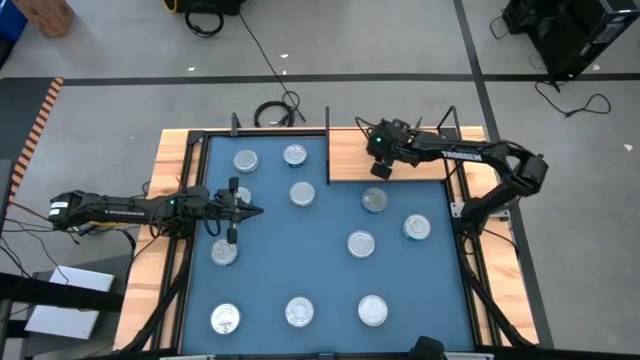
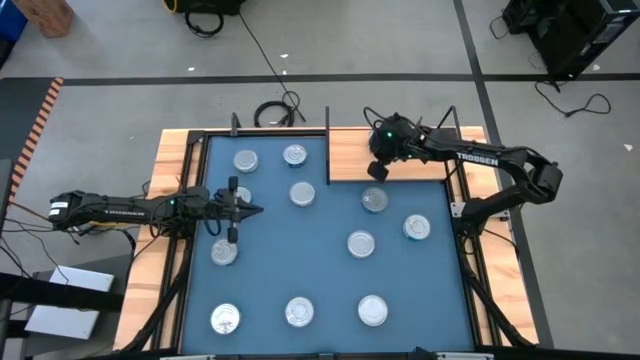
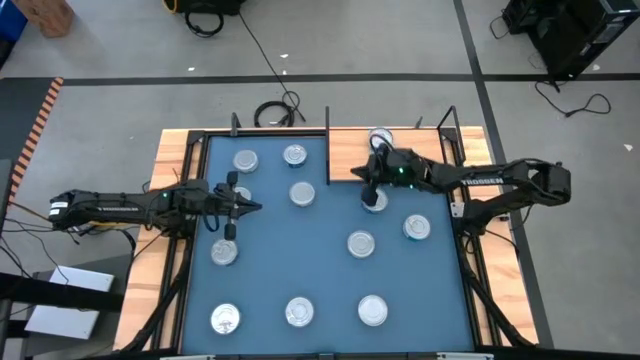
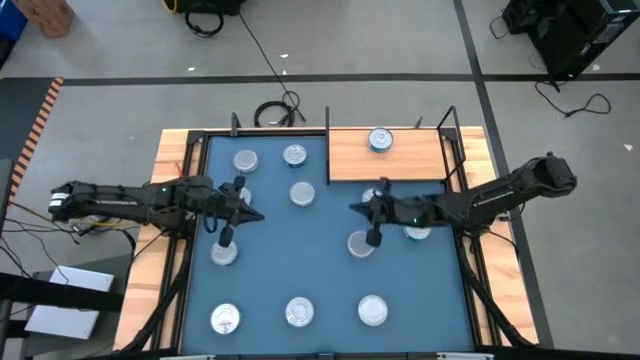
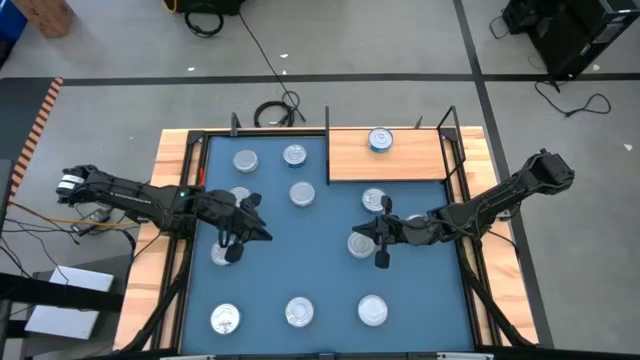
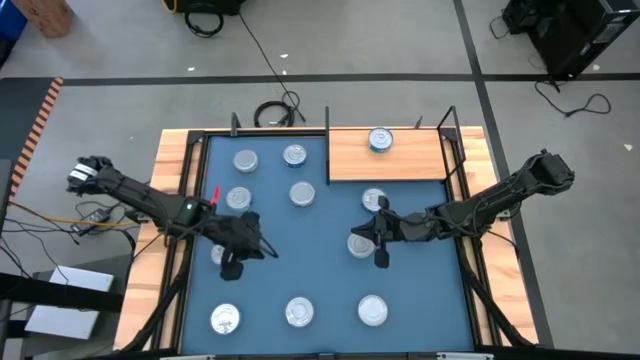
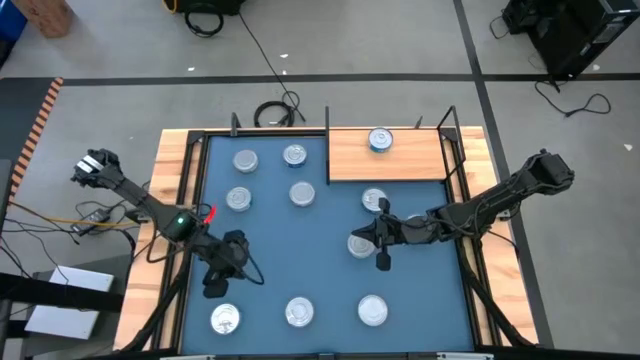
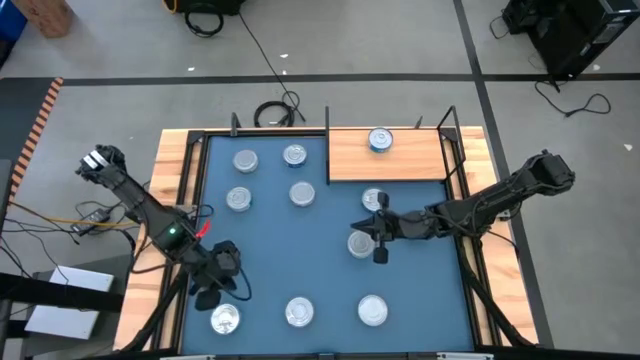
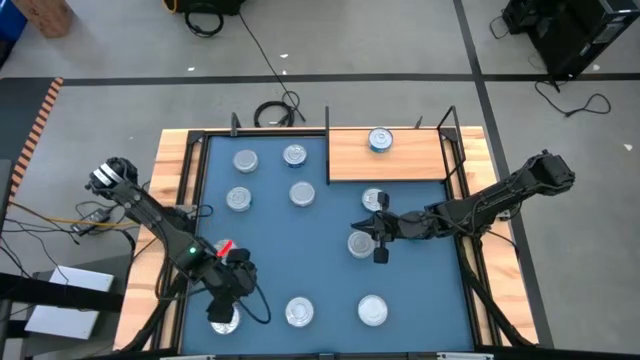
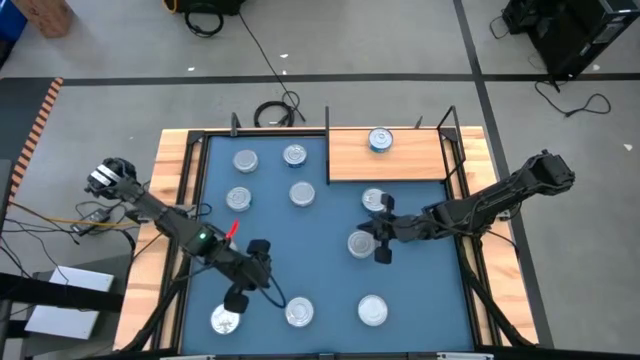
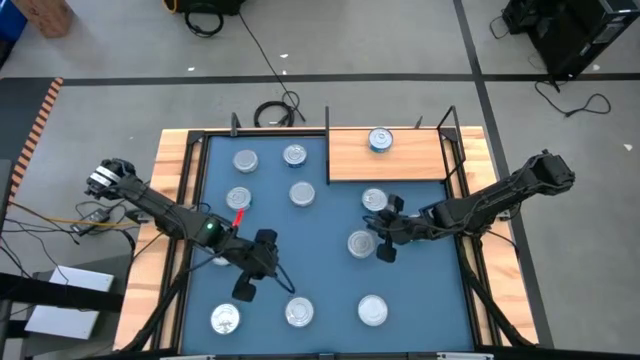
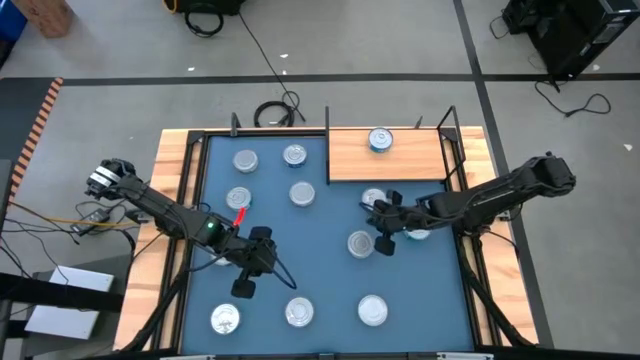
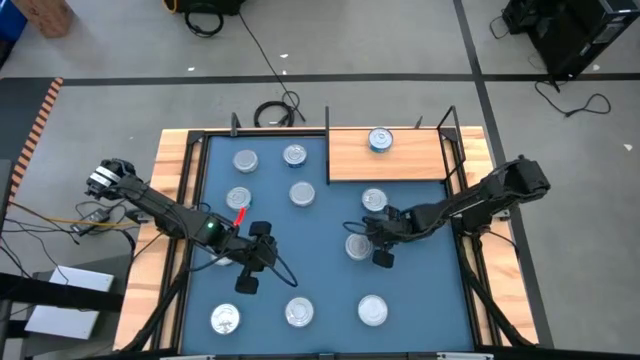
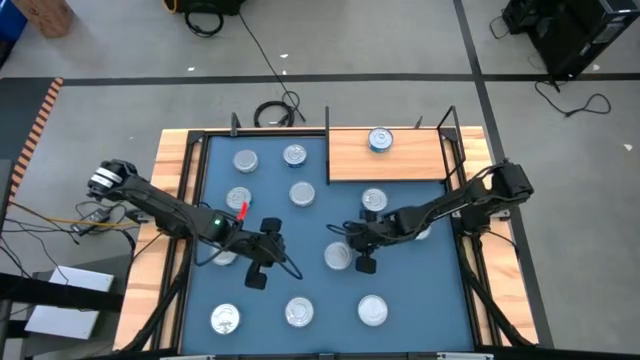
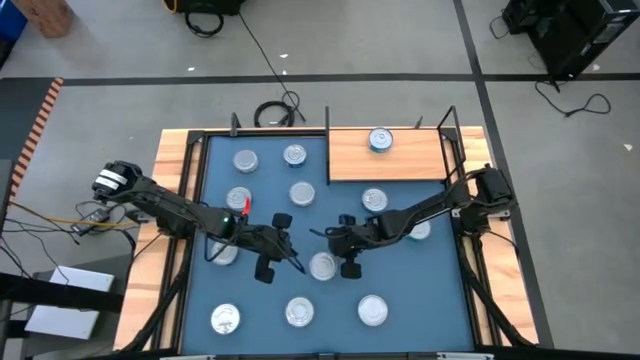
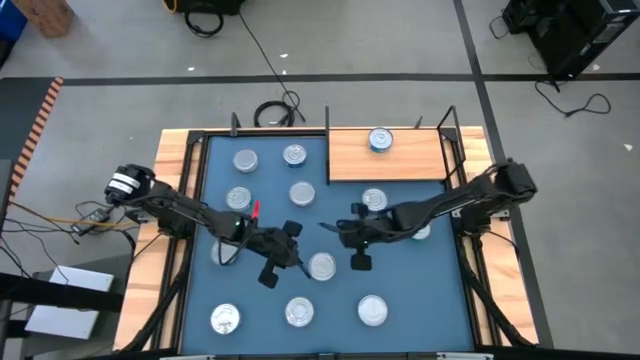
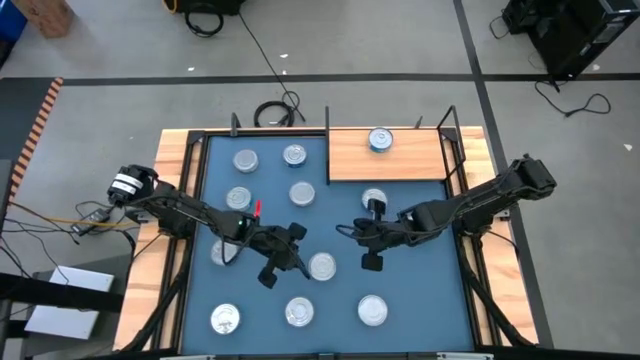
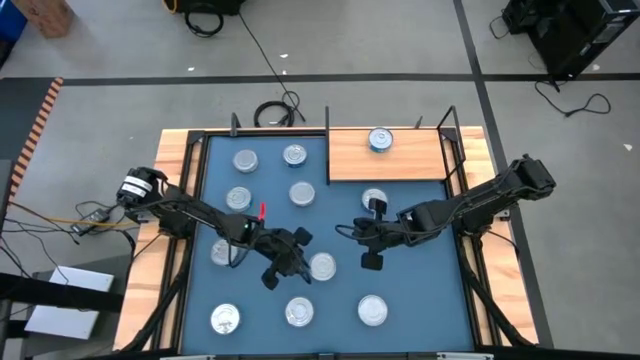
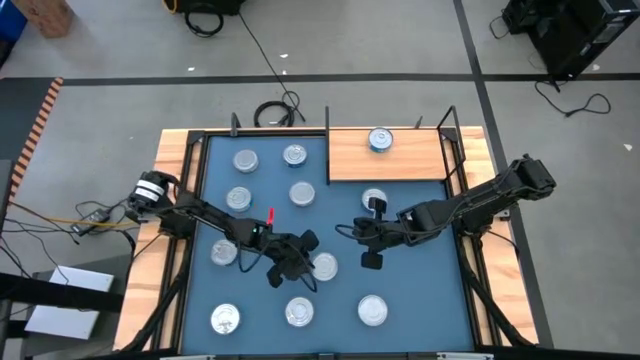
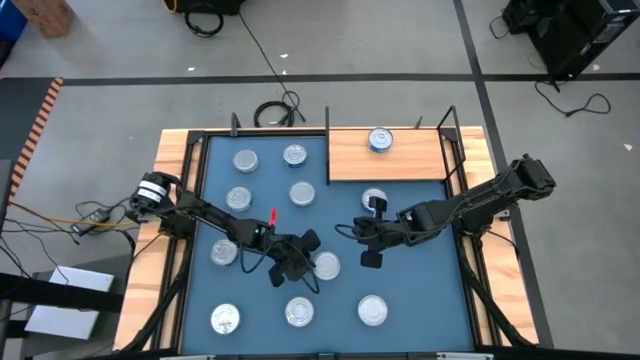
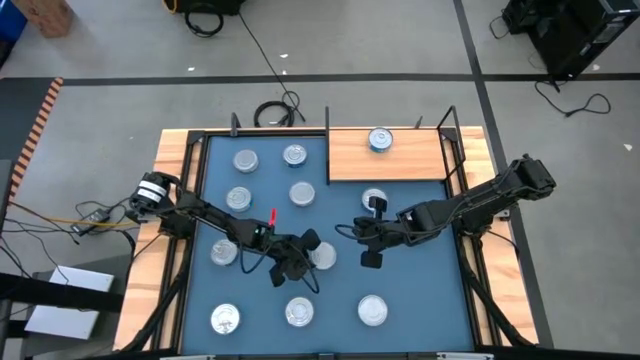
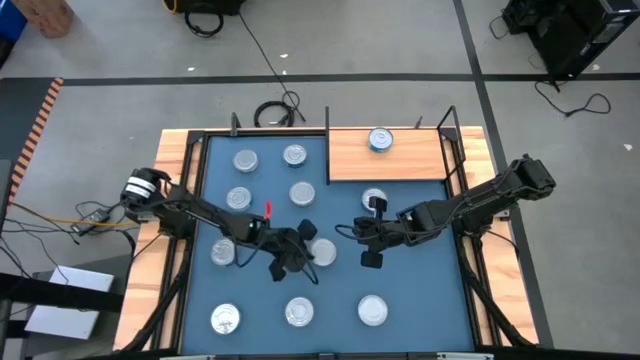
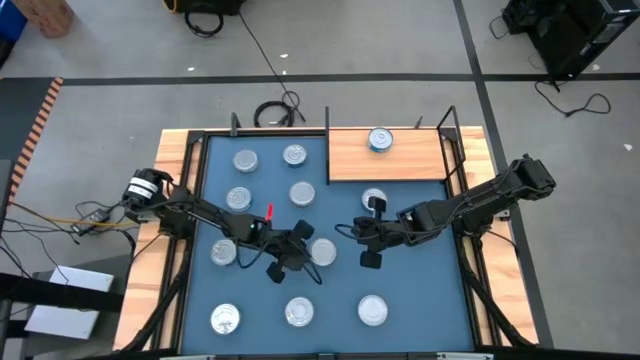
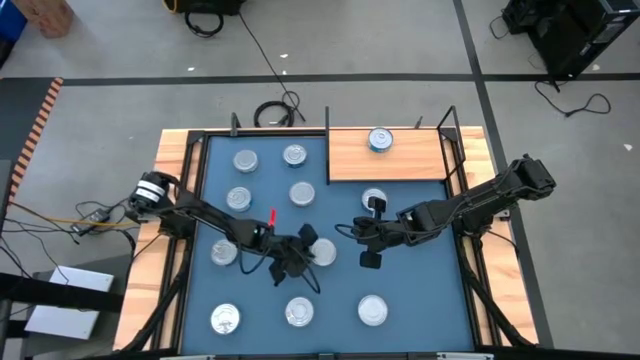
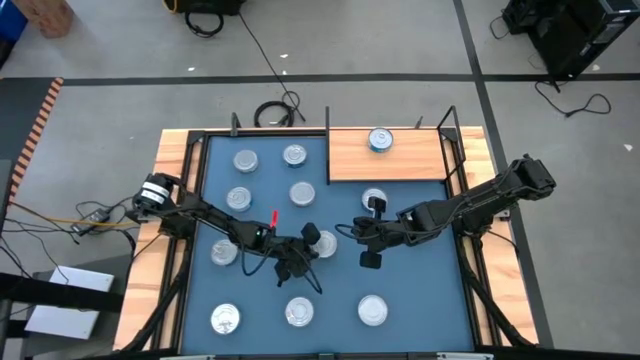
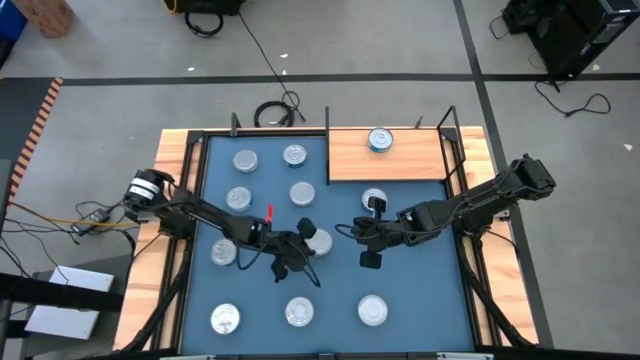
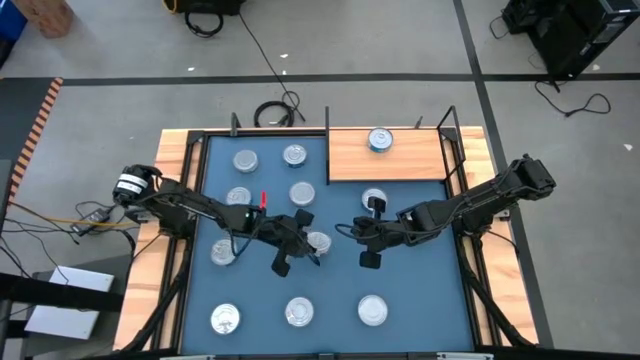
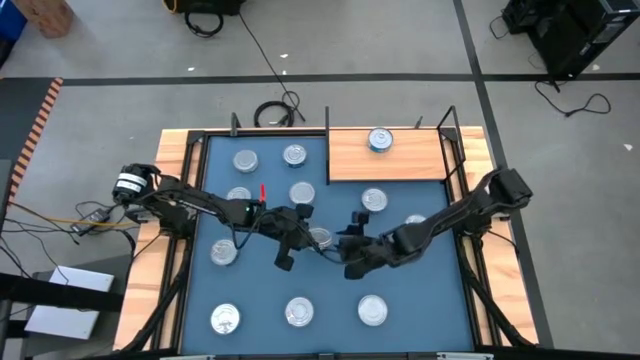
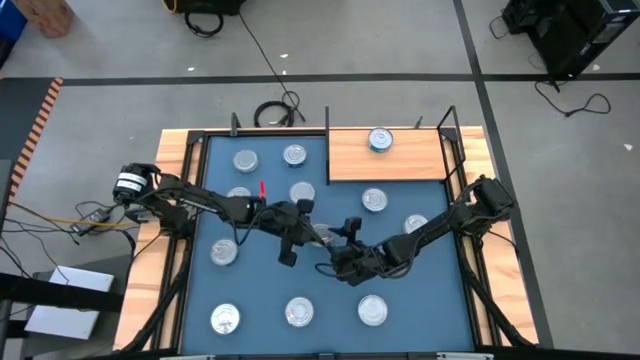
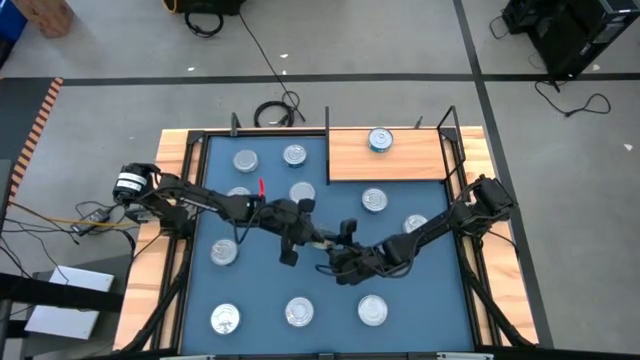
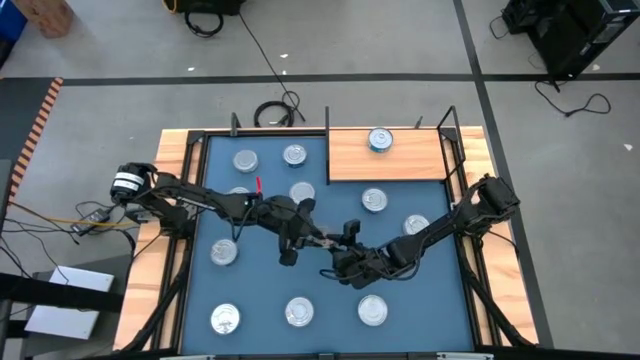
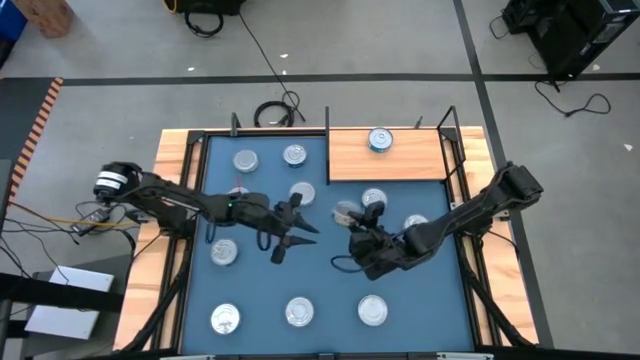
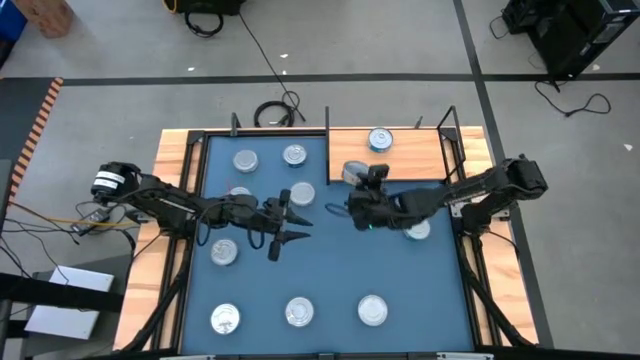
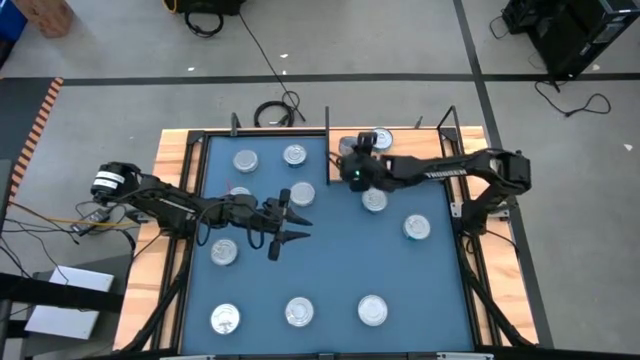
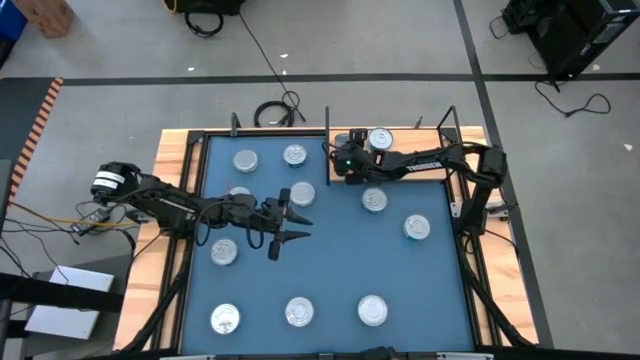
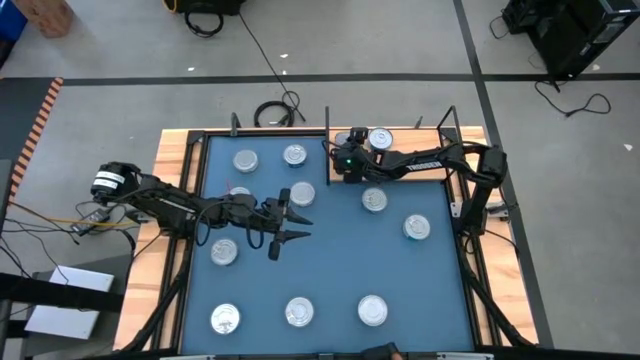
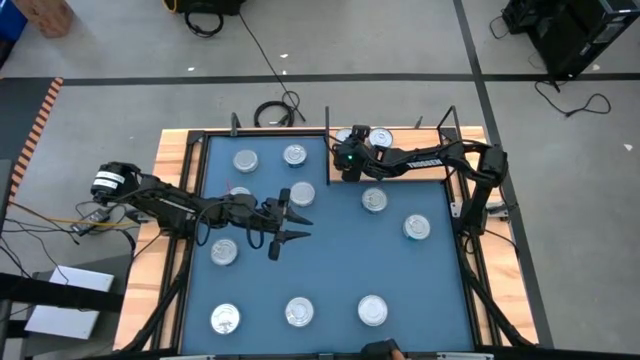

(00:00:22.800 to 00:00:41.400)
Task: Stack canned seafood by type on shelf
Put the middle right green tuna can on the shelf

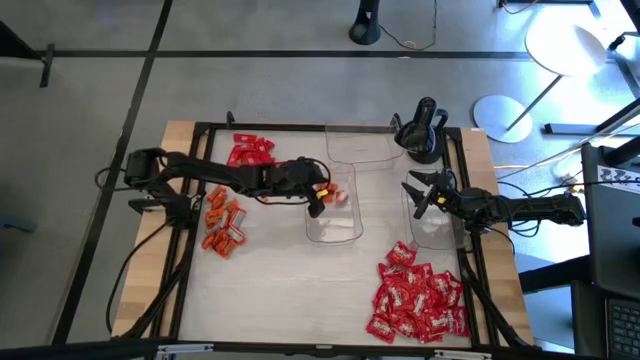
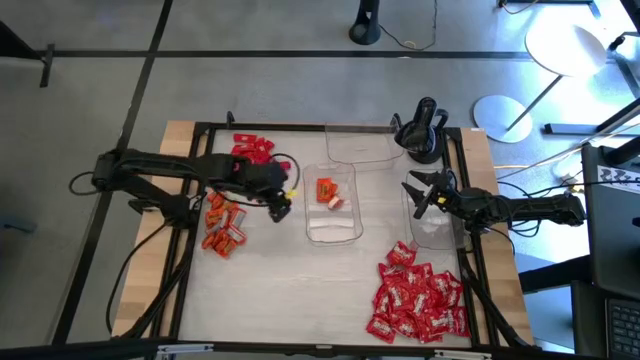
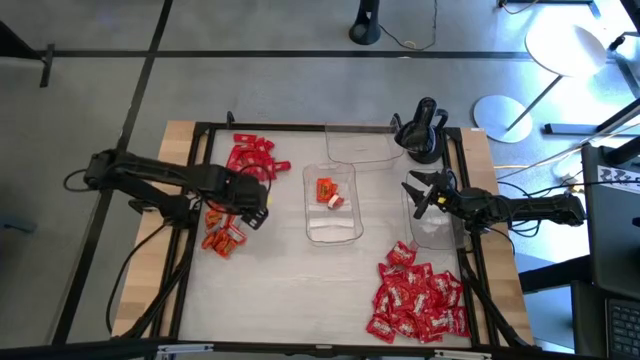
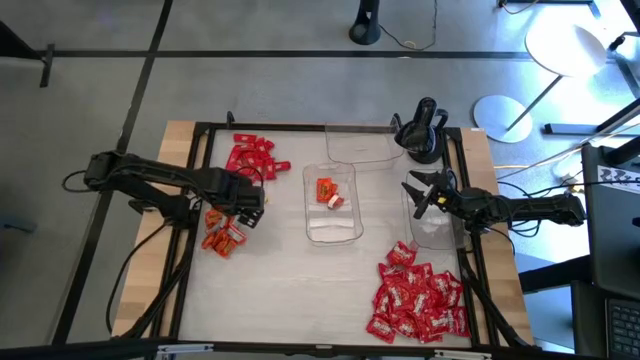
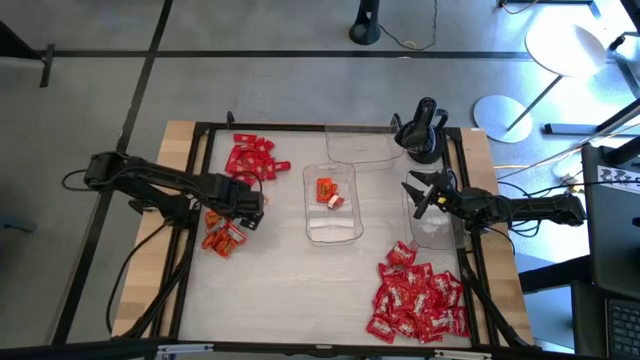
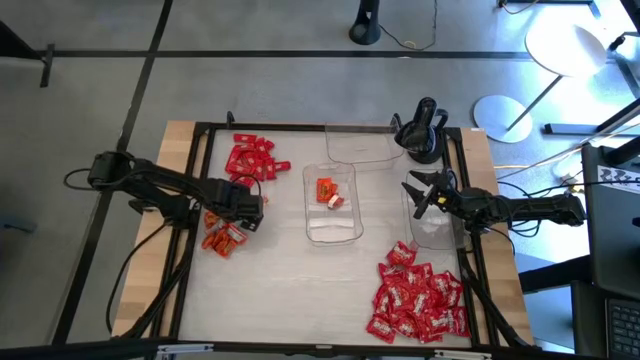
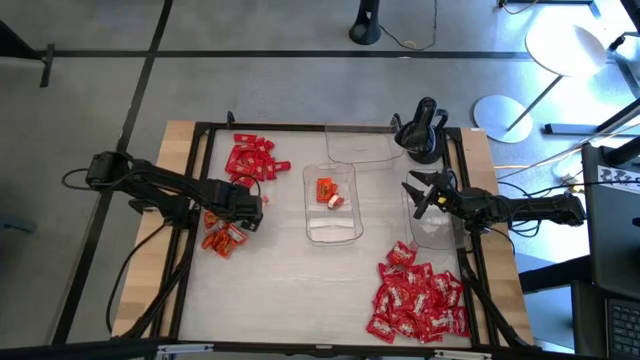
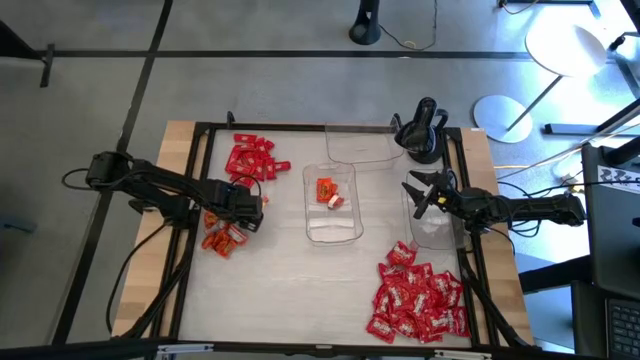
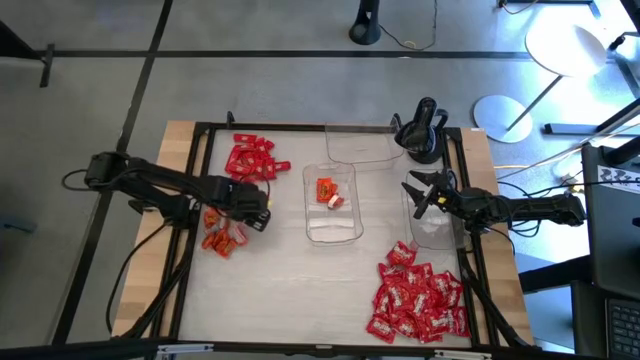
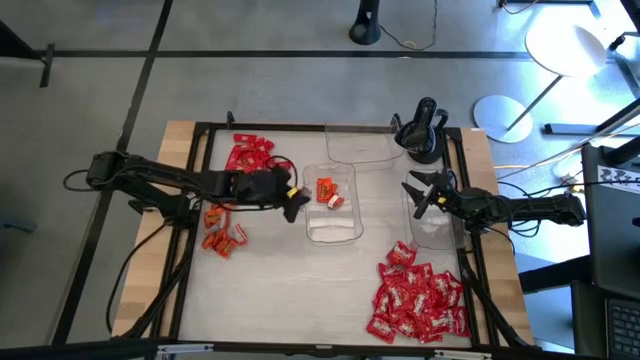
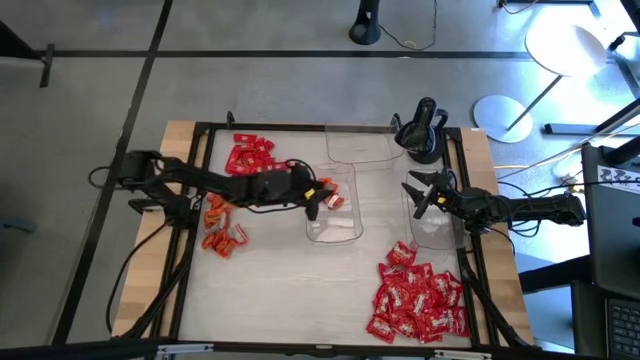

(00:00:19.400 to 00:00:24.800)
Task: Sort candy
Put the orange chocolate into the bottom left transparent bin
